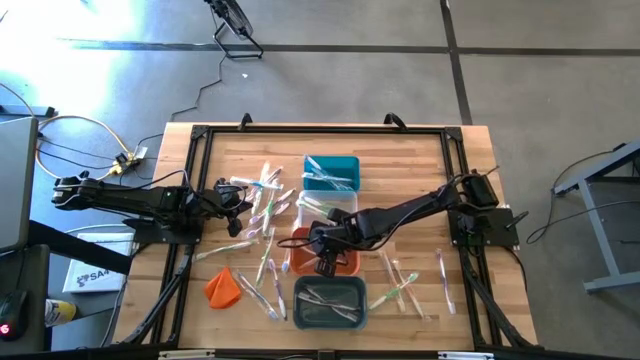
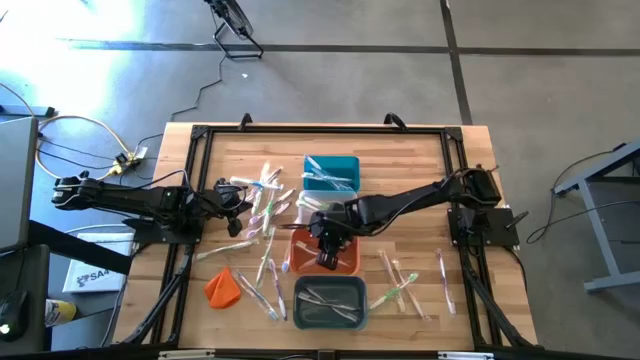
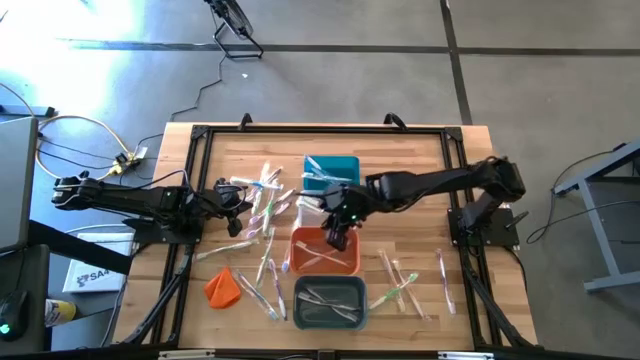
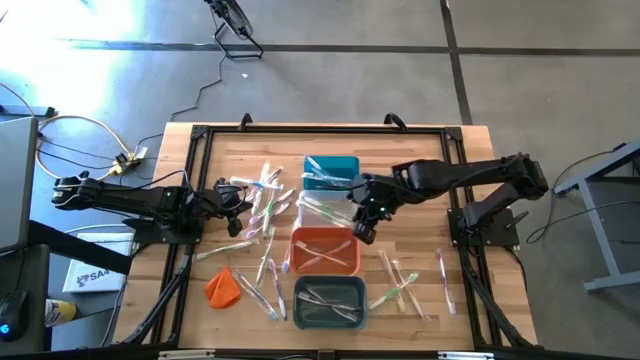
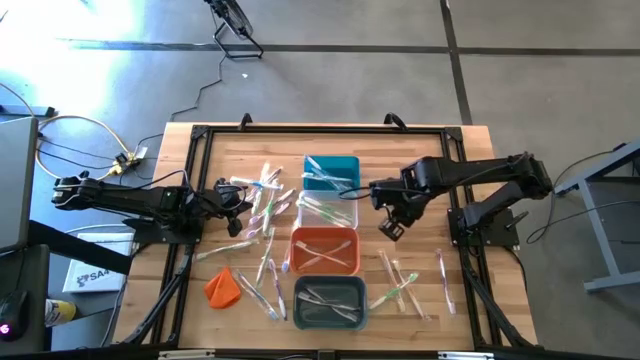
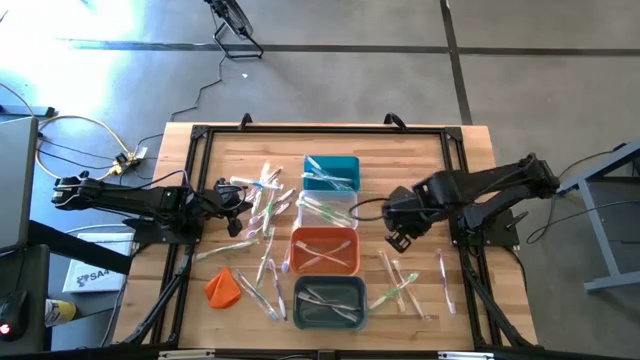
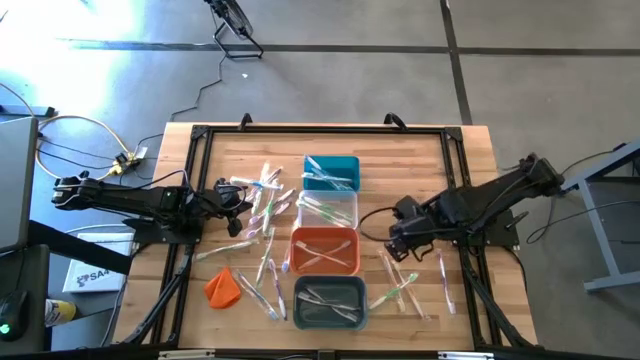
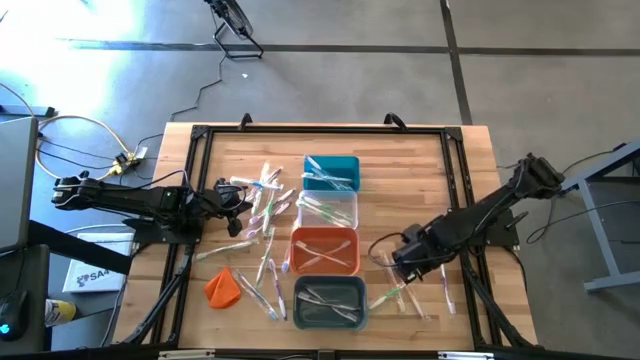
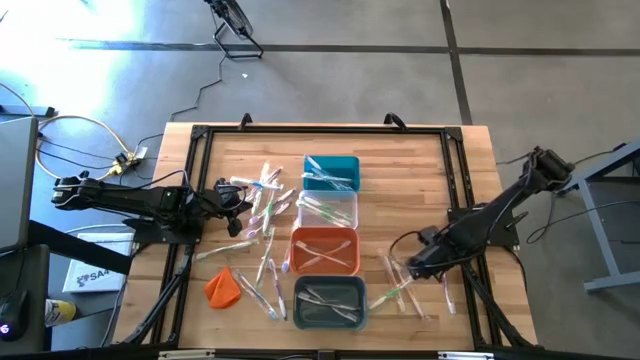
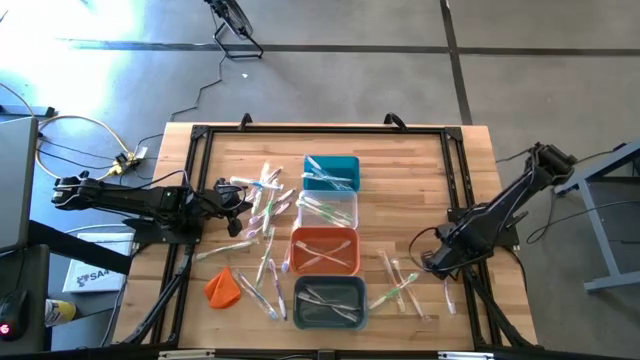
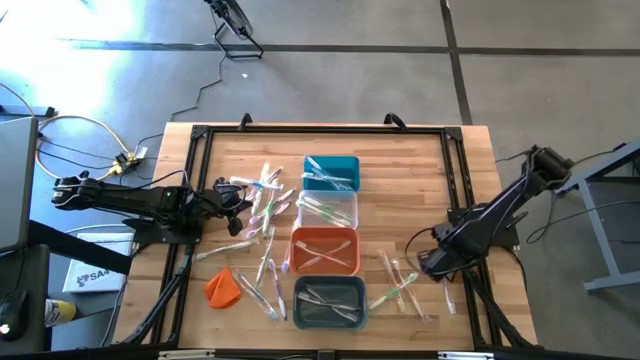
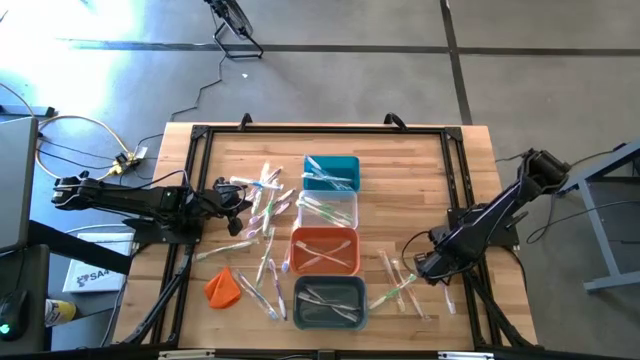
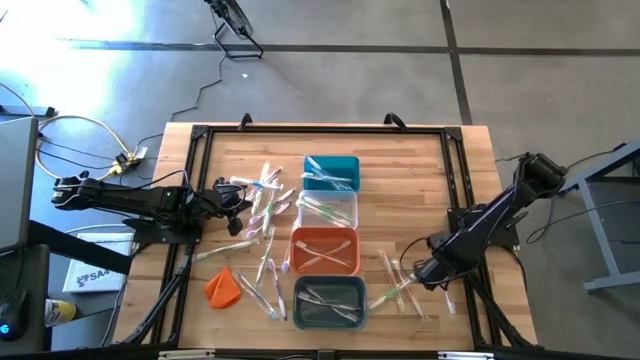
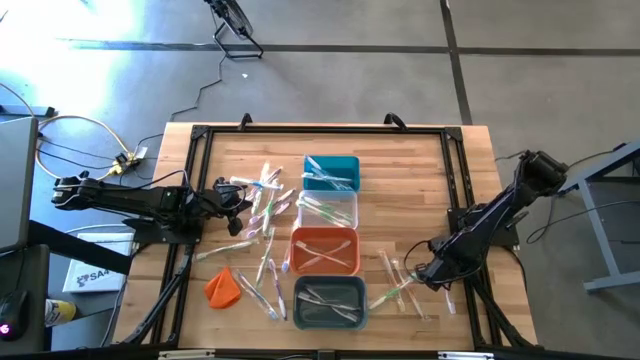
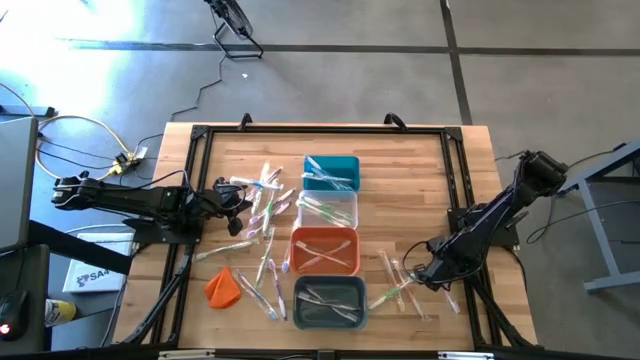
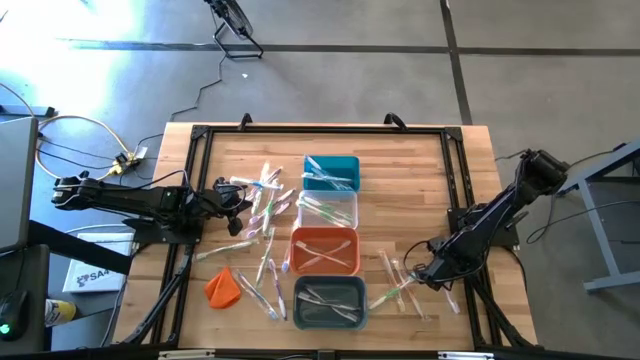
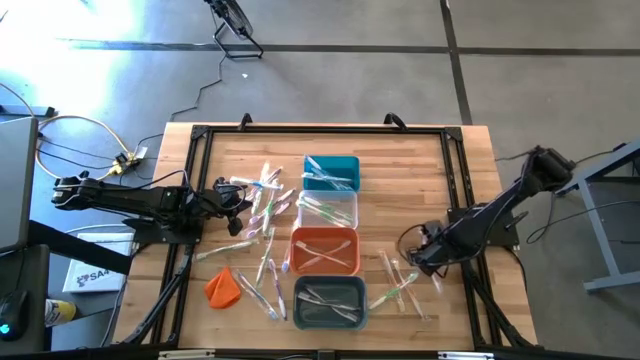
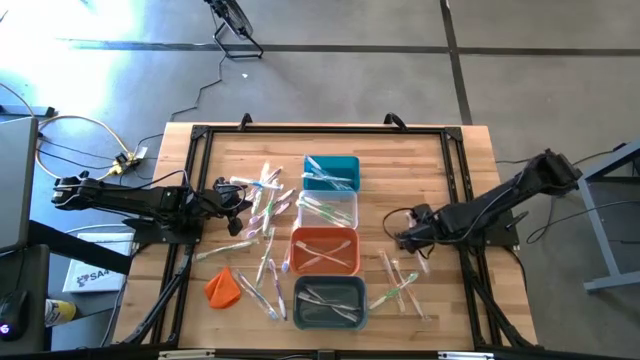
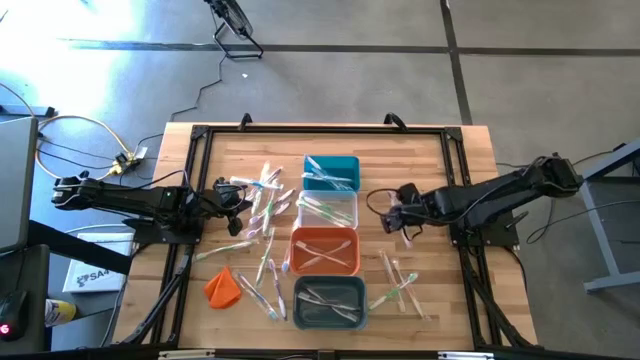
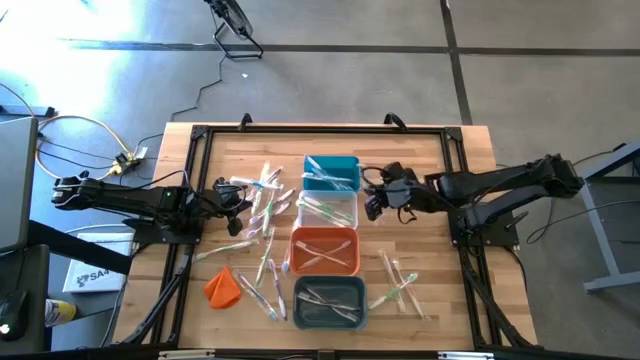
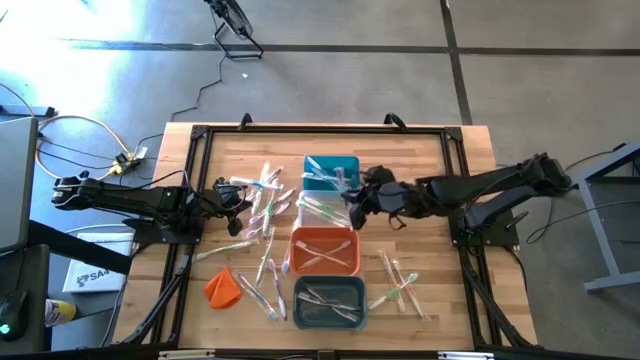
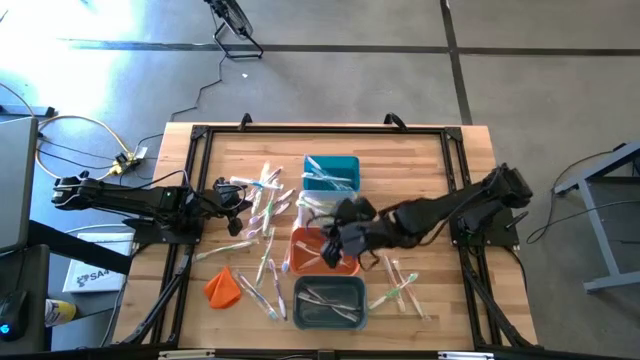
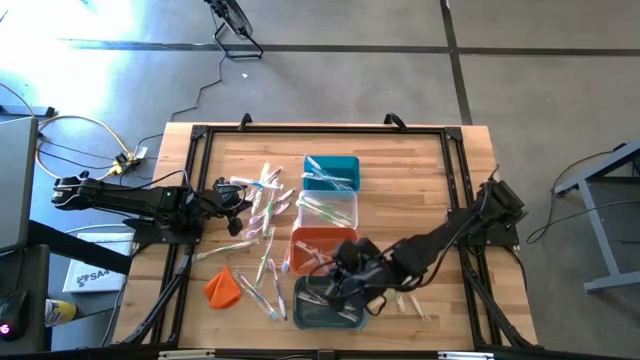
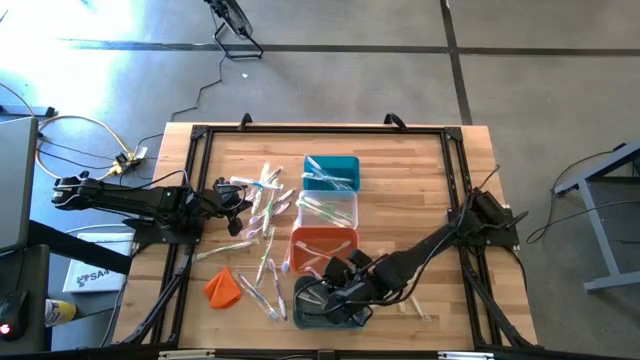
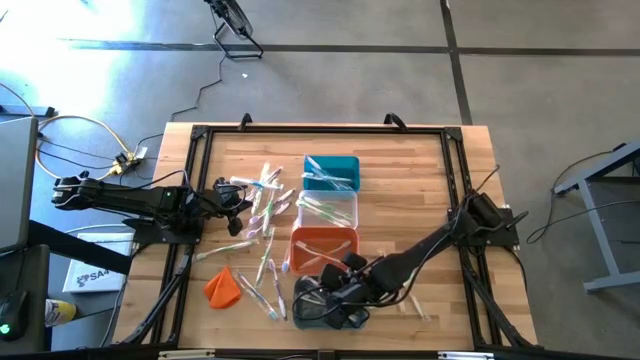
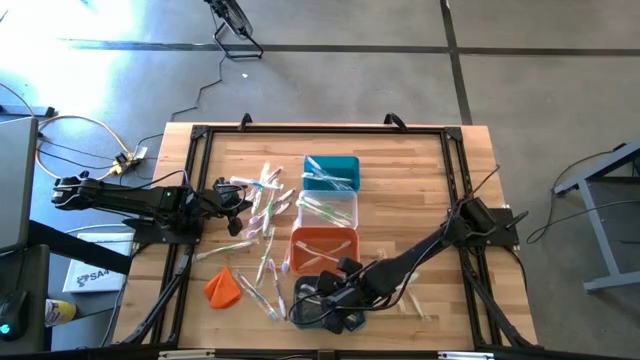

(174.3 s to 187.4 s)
Task: Pick & Place Toothbrushes
Put the violet toothbrush into the green bin

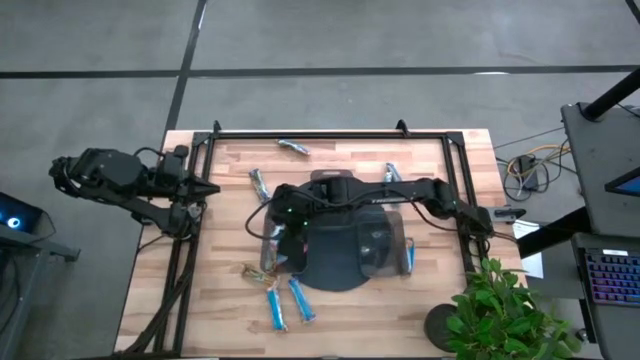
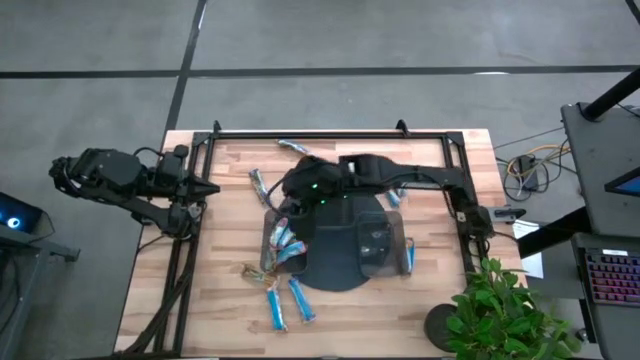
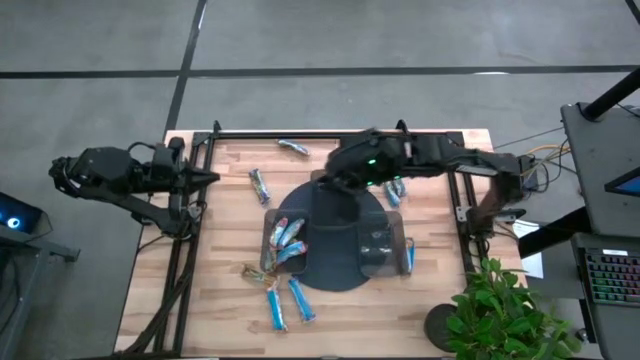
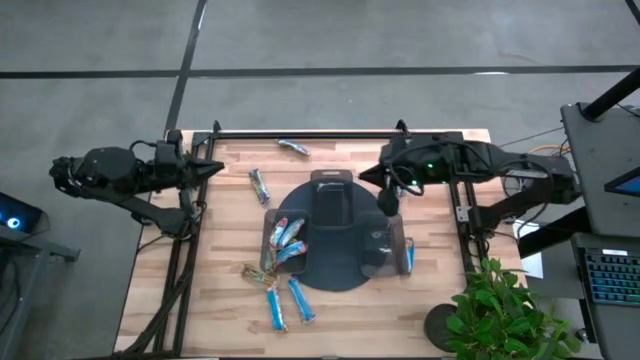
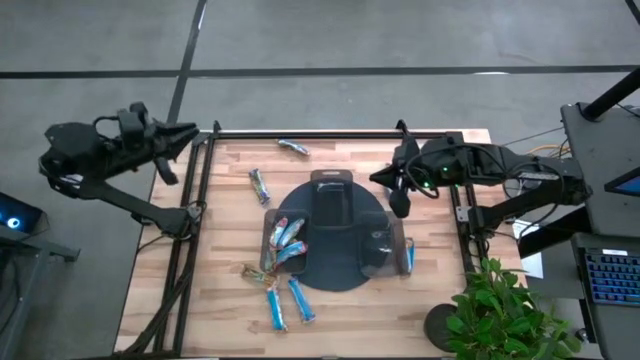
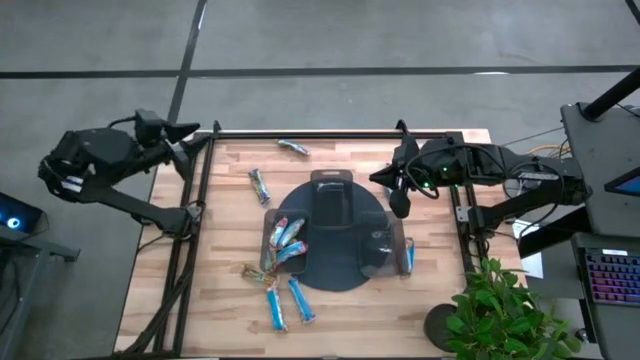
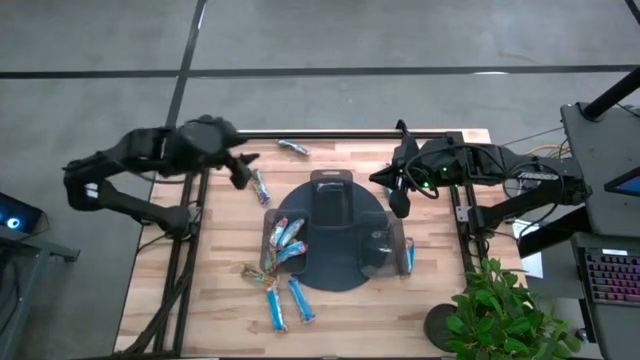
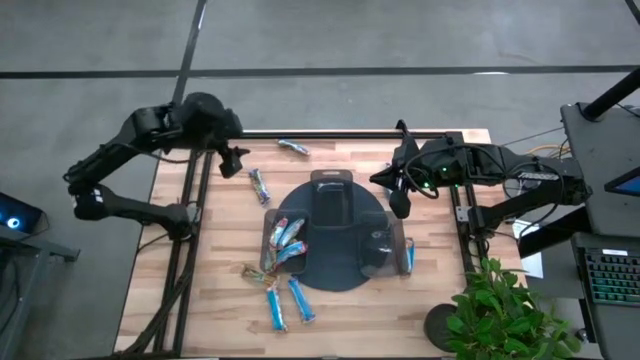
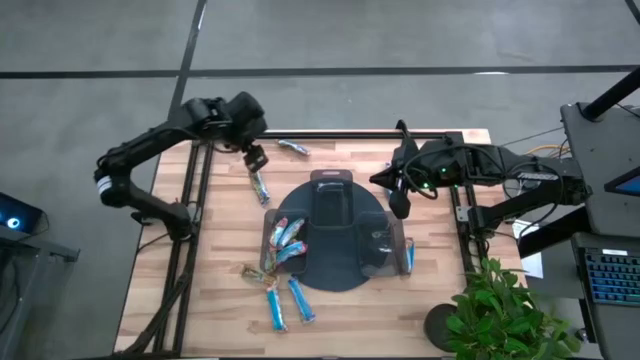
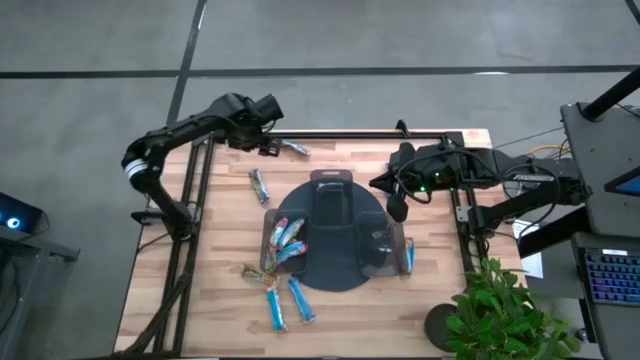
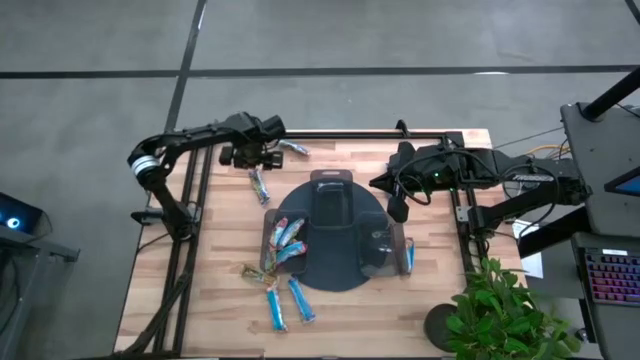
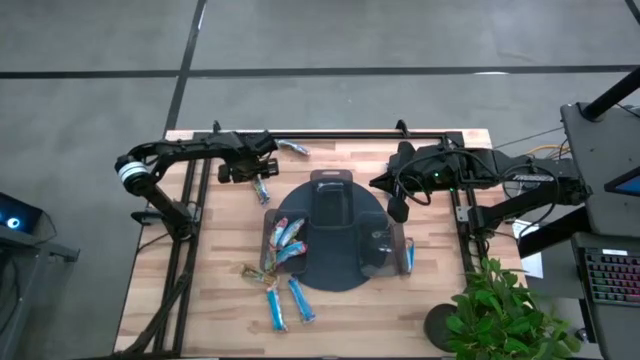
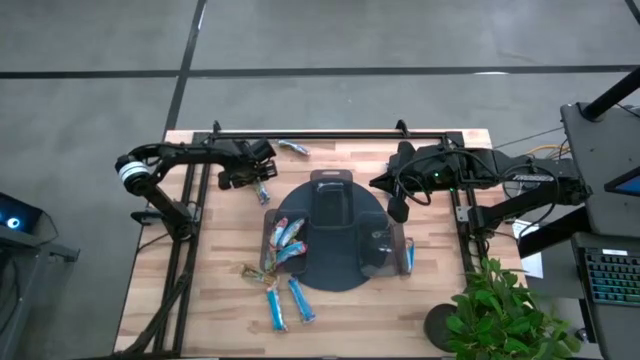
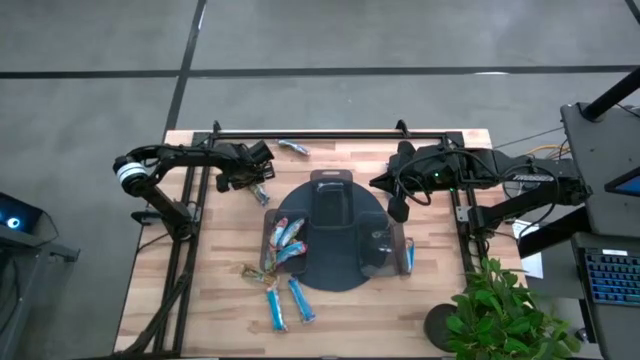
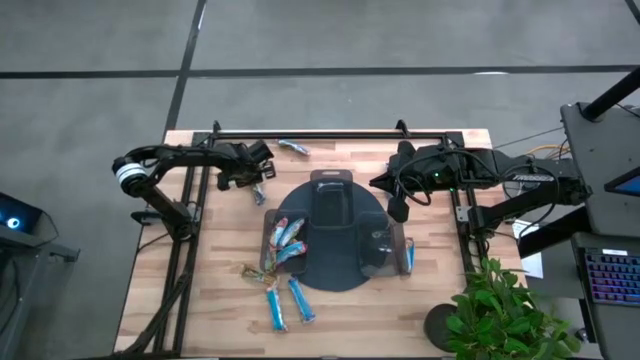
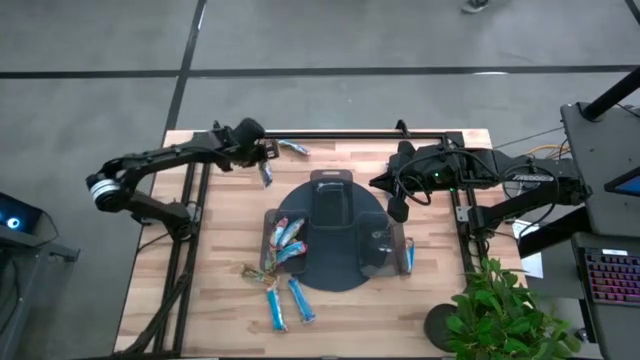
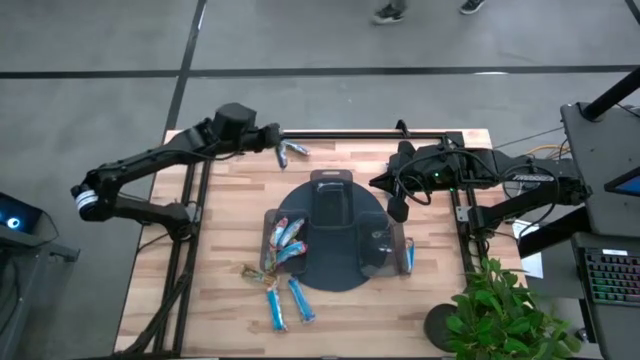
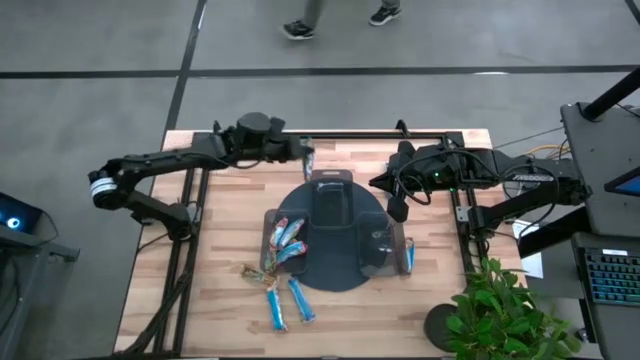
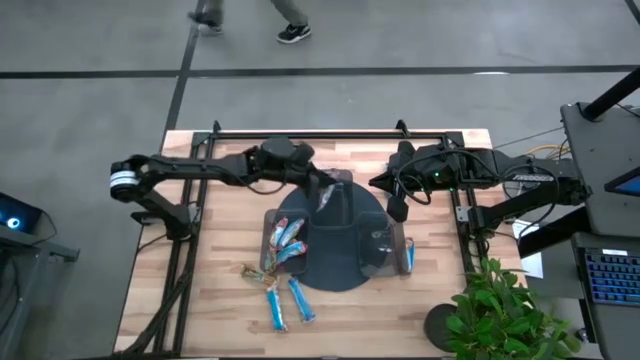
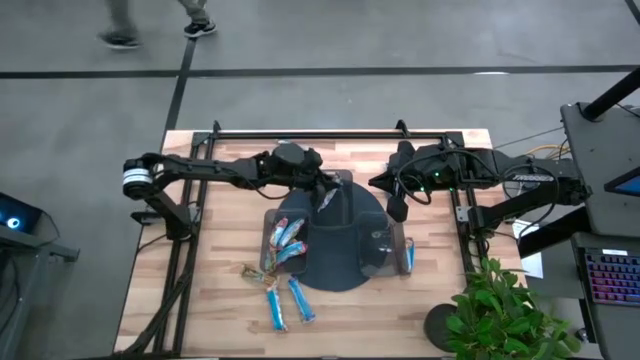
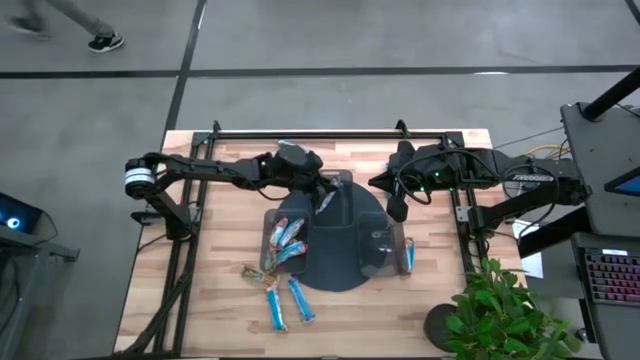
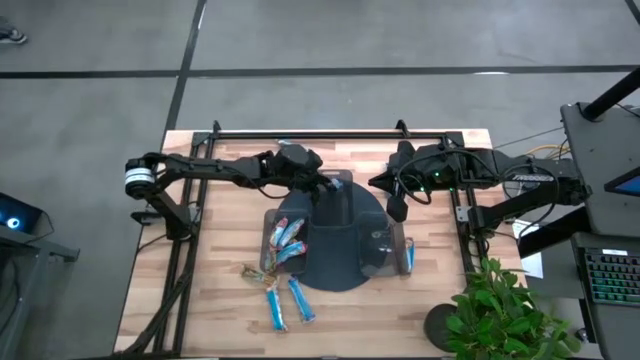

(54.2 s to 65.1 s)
Task: Pick and place Granola Bars by type
Put the blue granola bar into the top black bin
